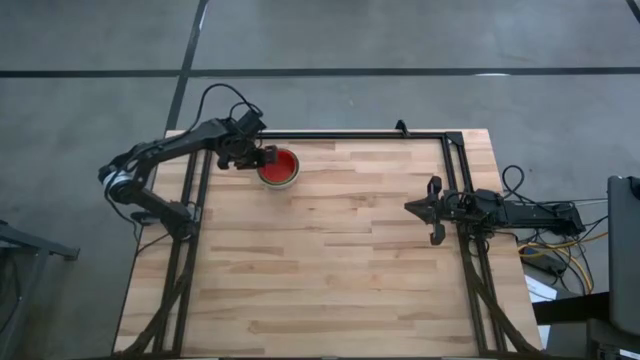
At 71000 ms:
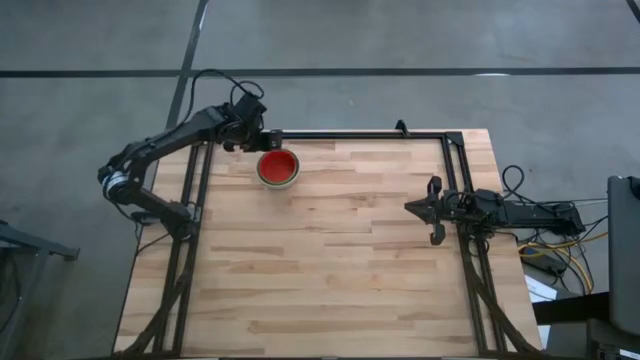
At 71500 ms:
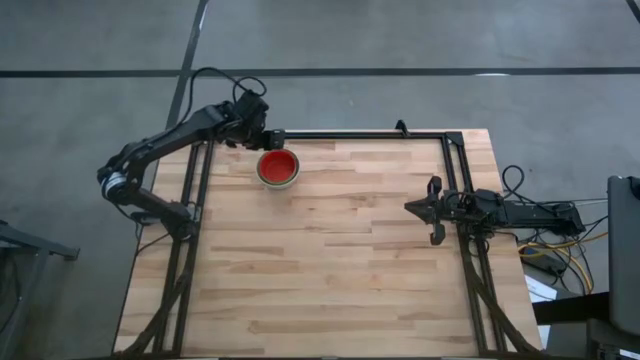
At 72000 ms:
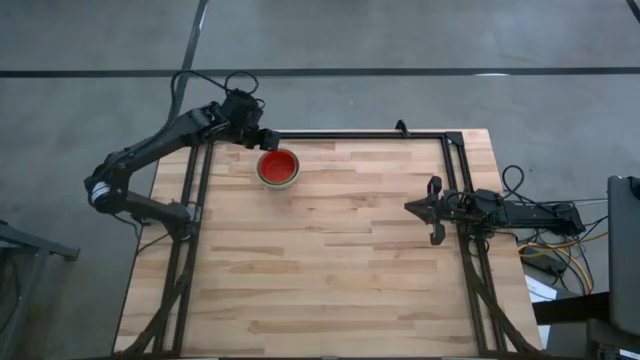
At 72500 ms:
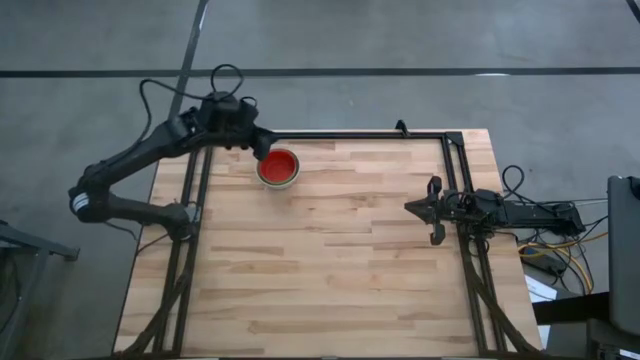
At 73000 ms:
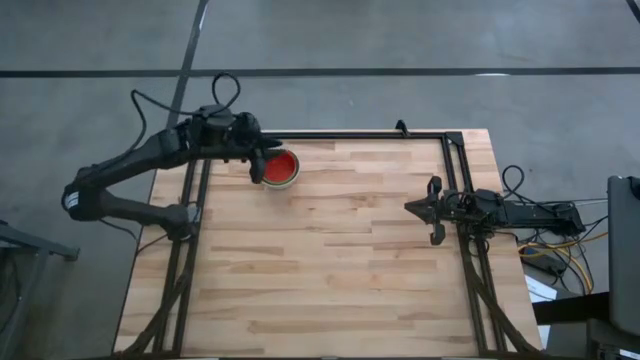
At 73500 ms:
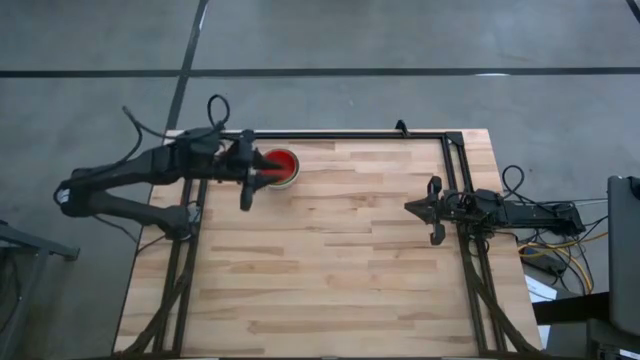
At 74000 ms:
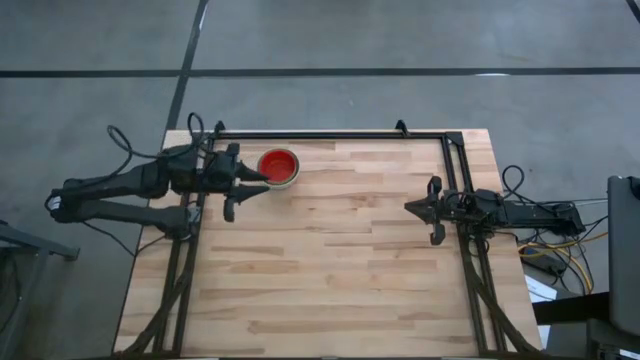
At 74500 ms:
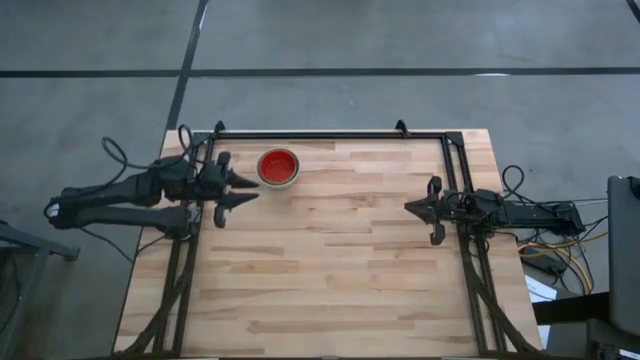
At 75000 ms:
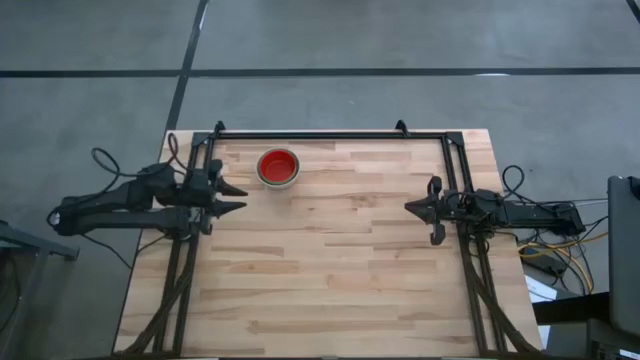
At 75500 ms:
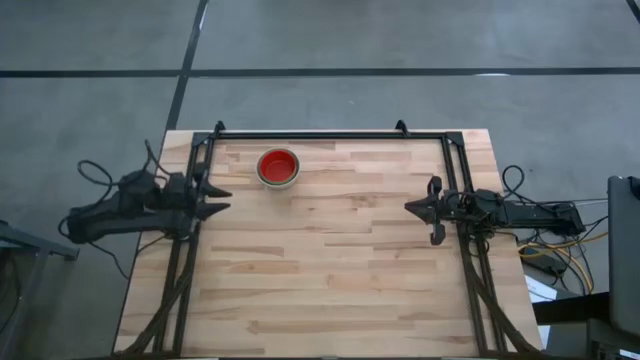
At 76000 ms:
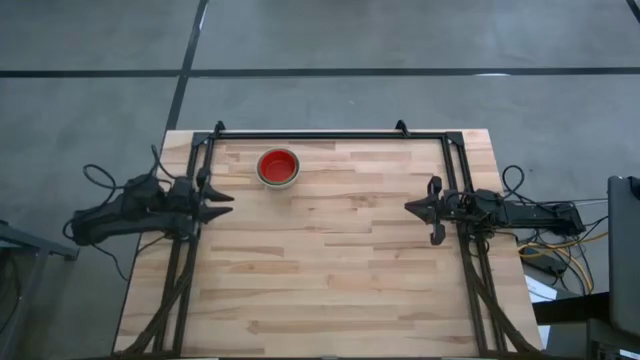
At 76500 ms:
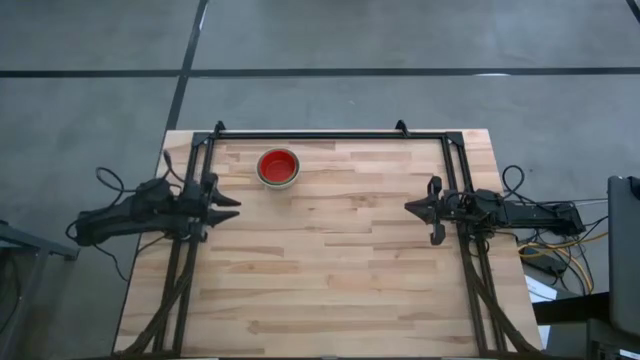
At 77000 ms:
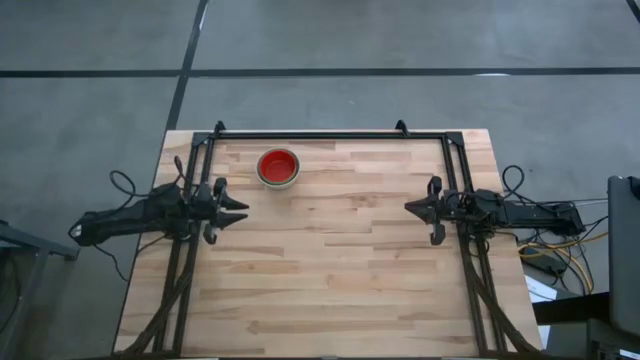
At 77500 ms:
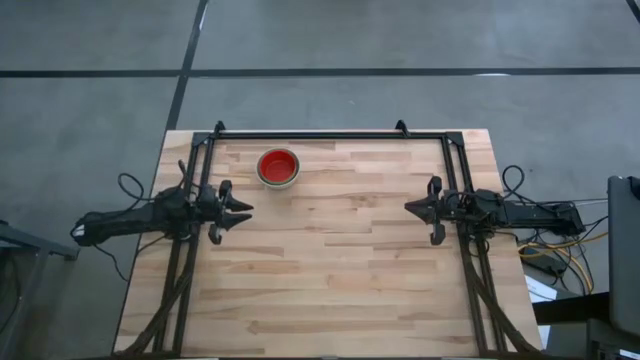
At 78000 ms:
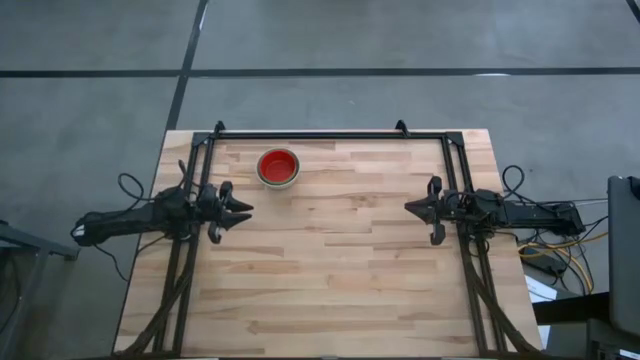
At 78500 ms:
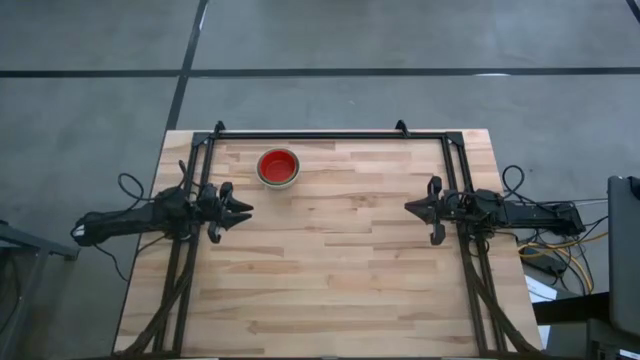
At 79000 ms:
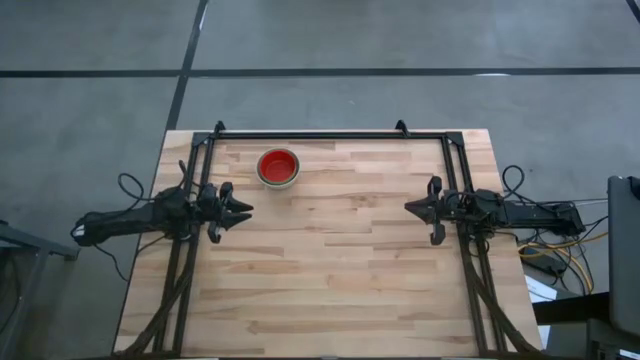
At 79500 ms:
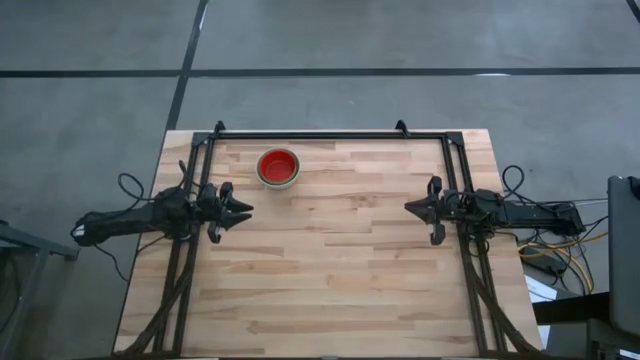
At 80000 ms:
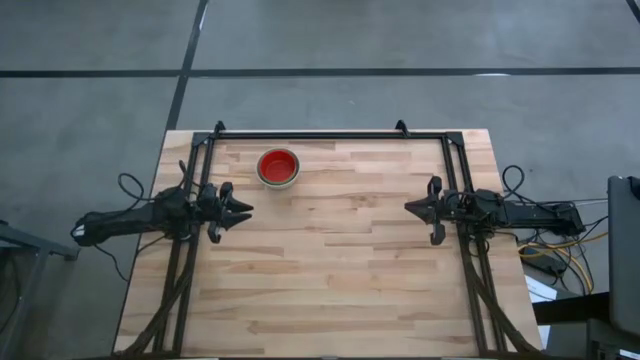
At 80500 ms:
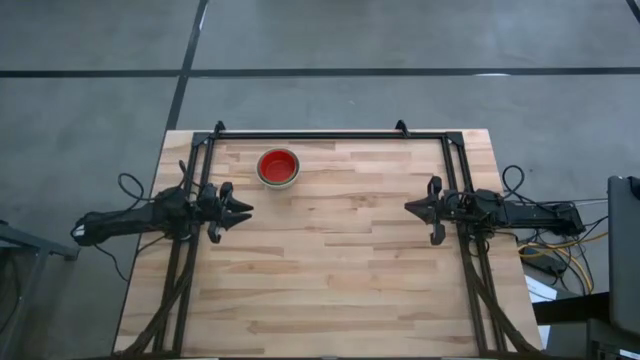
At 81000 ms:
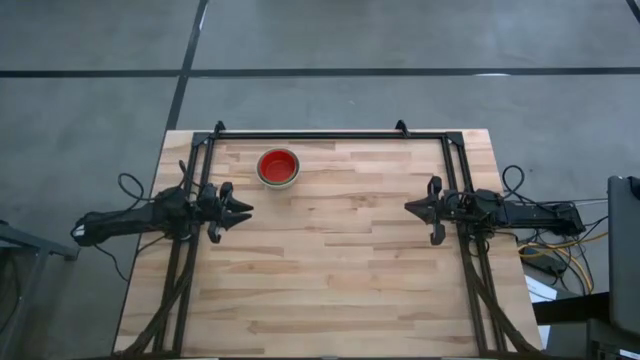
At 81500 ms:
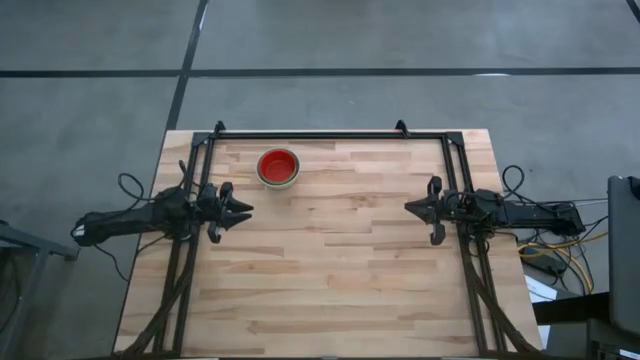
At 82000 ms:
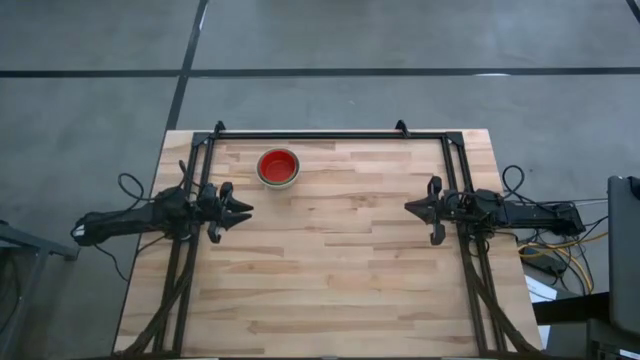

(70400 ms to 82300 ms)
Return to Home Position
